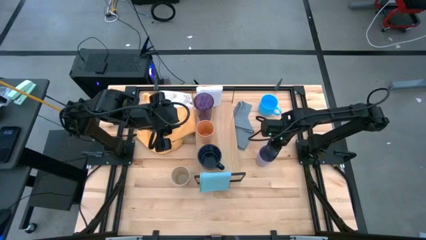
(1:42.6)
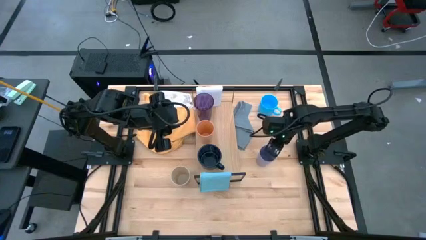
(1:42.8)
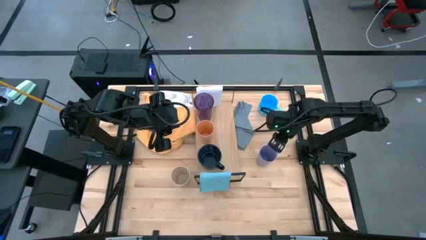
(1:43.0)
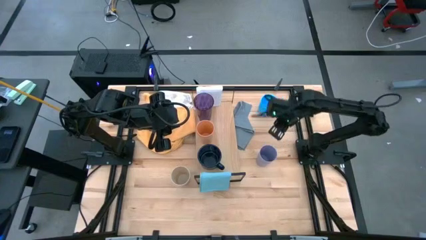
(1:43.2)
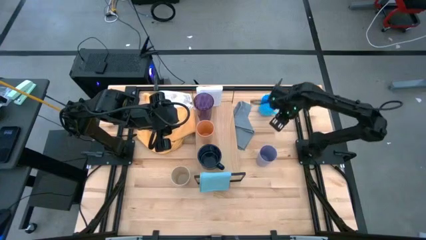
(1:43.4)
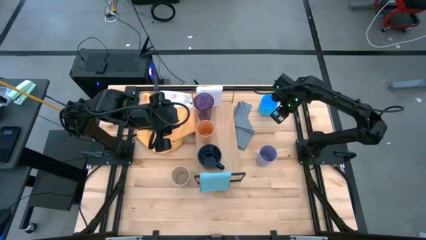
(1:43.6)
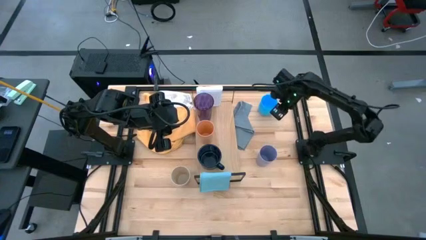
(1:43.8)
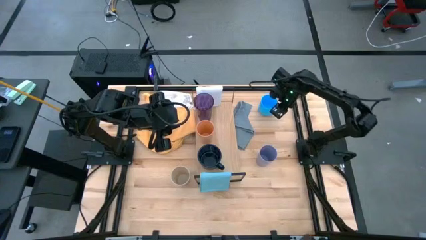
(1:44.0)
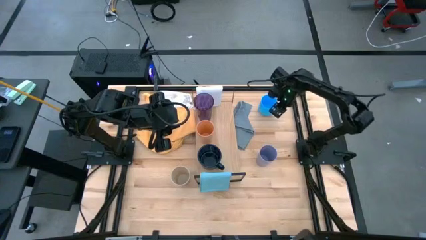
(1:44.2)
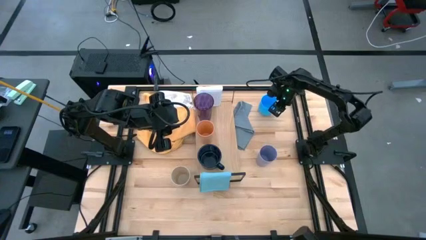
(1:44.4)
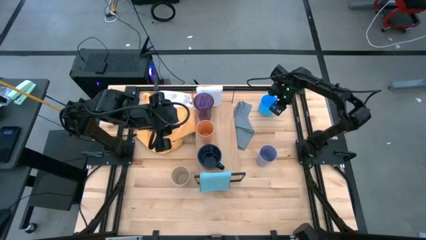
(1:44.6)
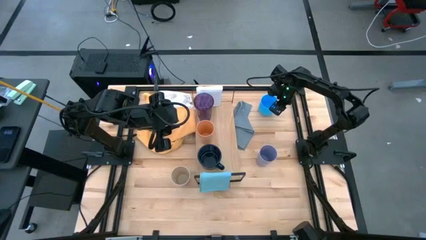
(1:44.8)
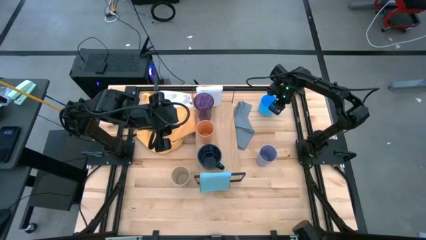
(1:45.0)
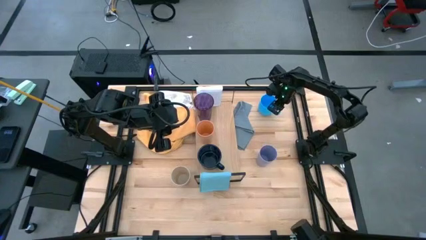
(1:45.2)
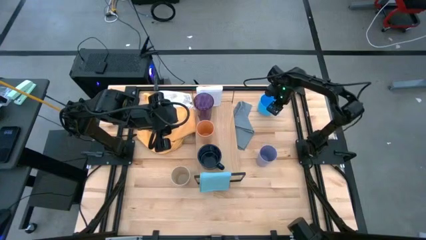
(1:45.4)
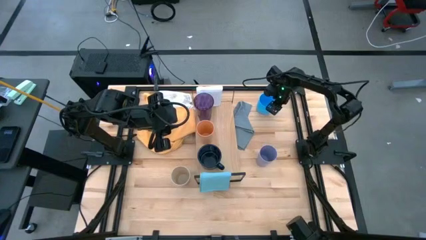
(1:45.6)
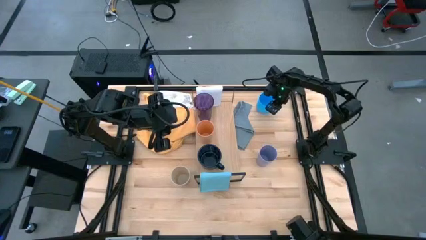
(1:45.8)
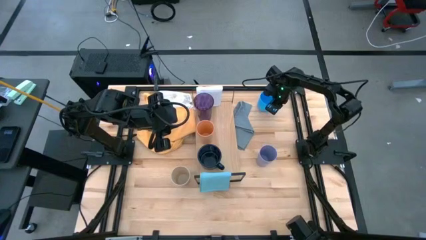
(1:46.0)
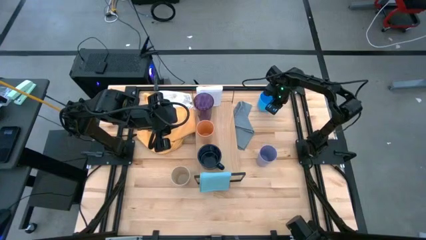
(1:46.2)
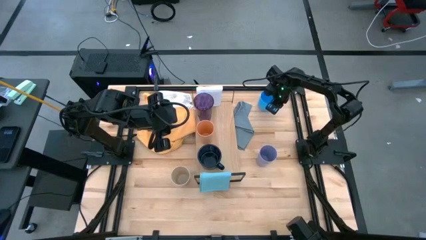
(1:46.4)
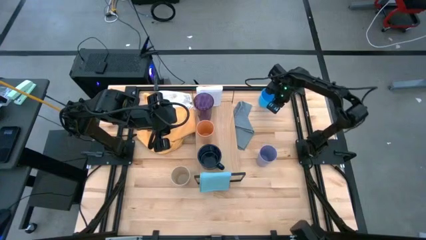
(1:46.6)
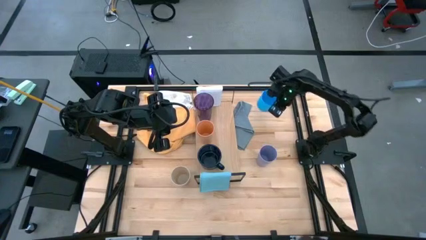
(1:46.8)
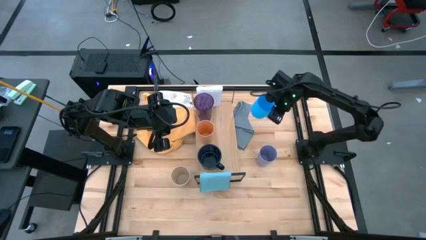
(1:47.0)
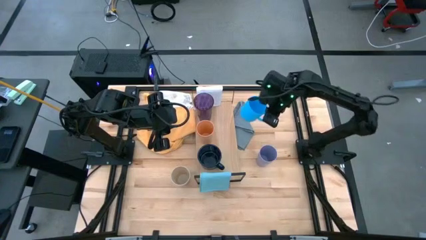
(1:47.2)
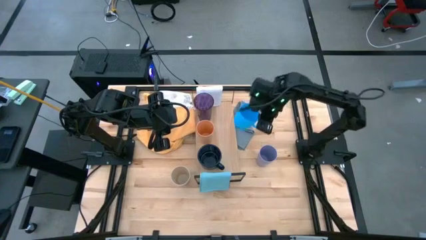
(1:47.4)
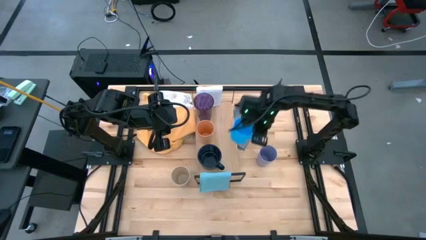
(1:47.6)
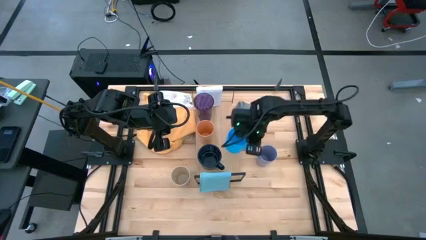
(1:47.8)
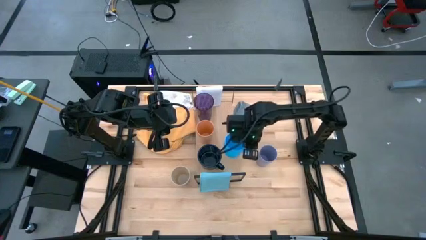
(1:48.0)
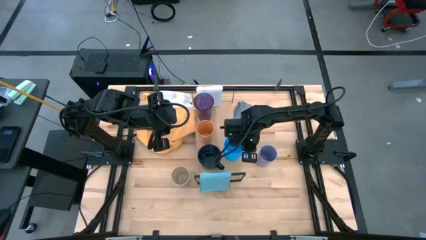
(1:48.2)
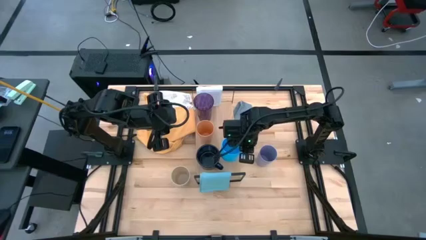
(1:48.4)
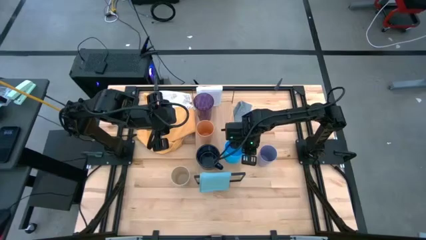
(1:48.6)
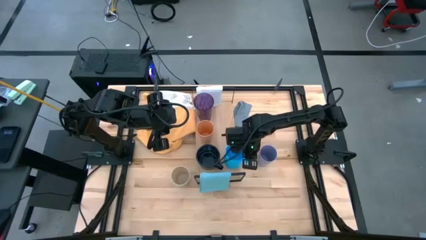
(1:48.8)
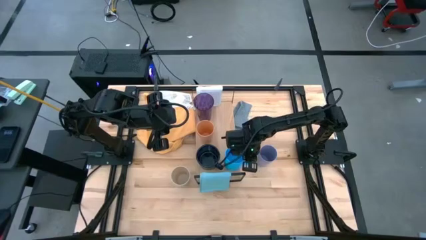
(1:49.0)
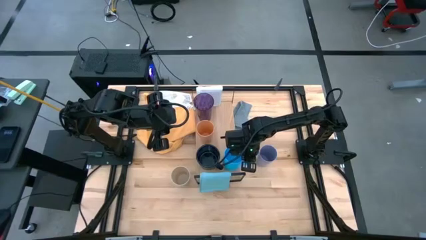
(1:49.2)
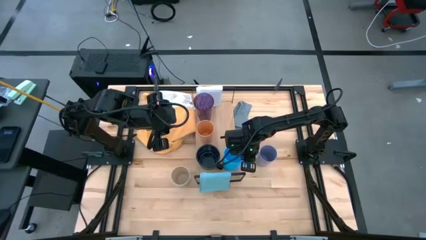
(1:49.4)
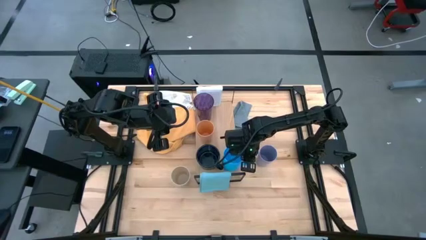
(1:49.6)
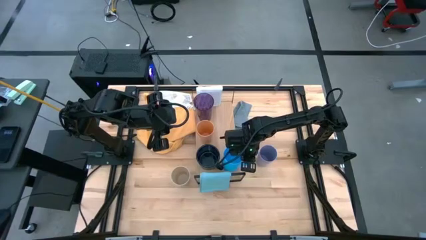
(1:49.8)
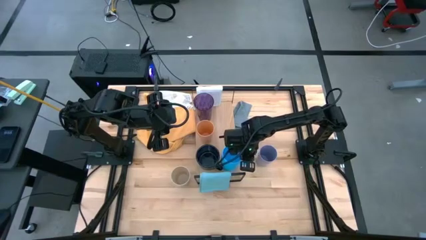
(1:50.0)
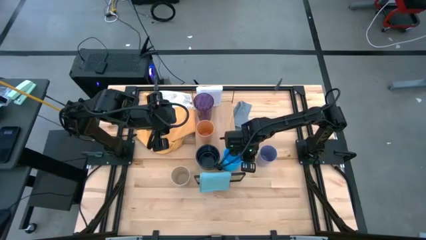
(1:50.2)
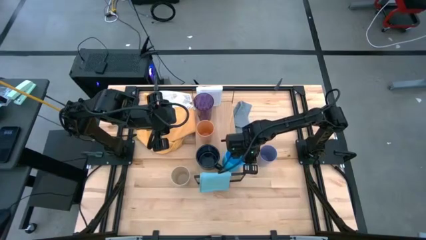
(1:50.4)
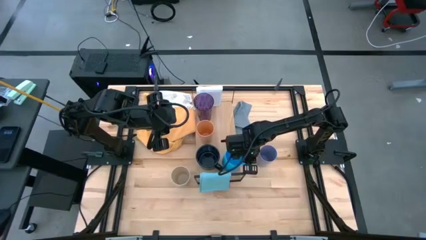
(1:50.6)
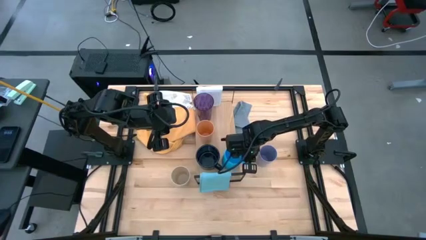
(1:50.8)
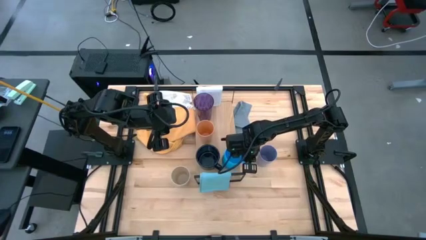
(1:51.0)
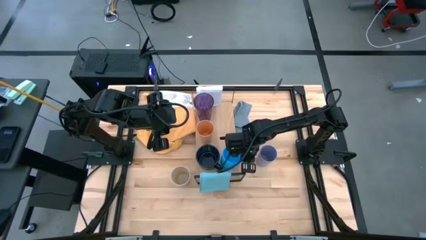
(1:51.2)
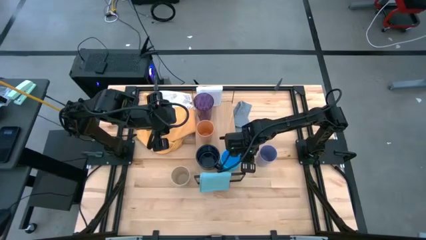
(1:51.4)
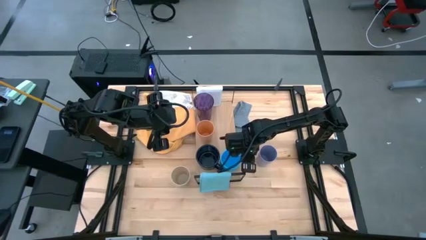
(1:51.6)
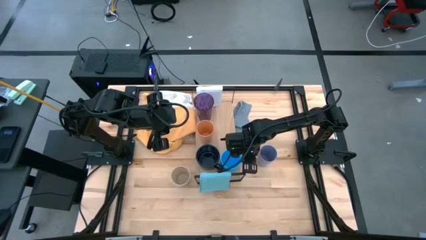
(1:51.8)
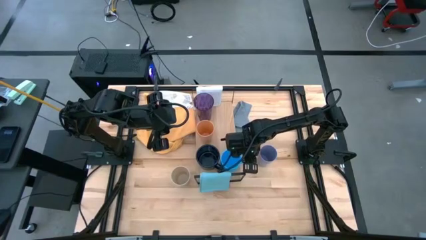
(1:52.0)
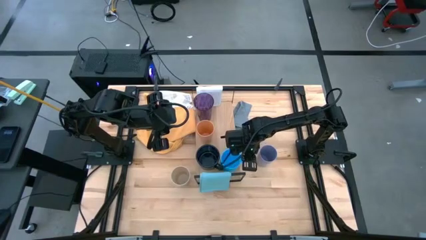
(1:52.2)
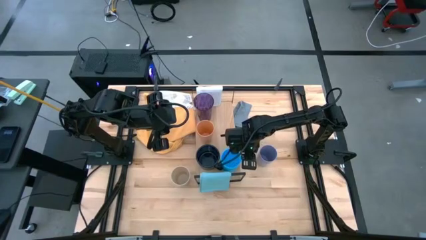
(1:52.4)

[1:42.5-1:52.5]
Task: Stack small to large cups/mugs on shelf
Put the blue mug on the shelf

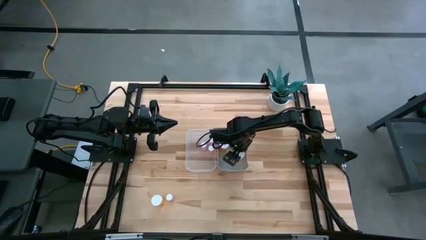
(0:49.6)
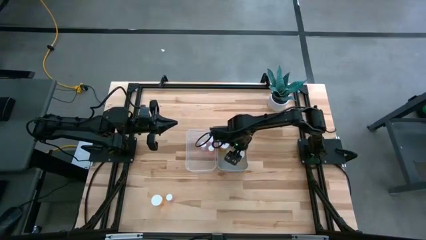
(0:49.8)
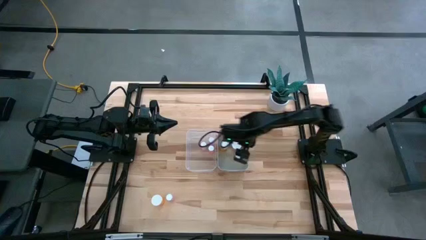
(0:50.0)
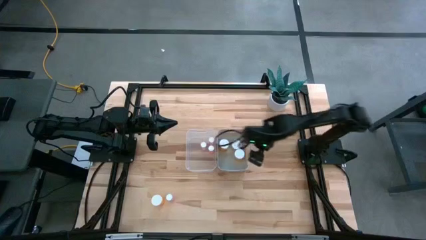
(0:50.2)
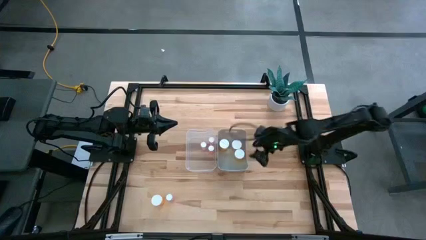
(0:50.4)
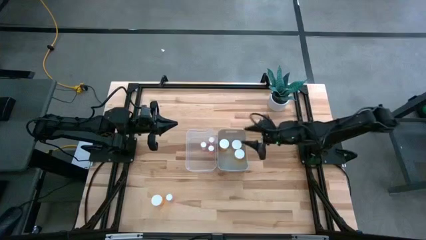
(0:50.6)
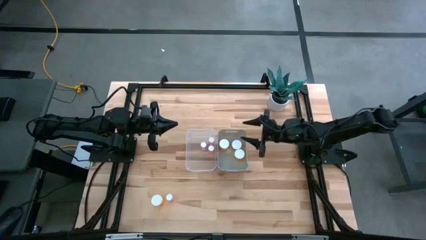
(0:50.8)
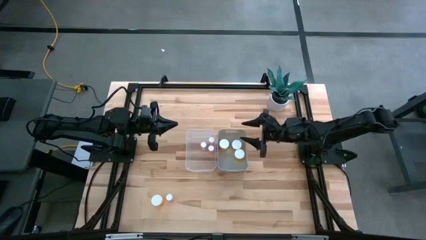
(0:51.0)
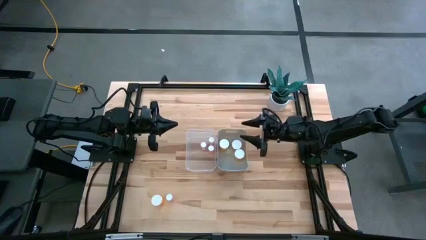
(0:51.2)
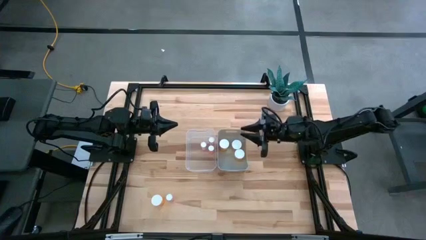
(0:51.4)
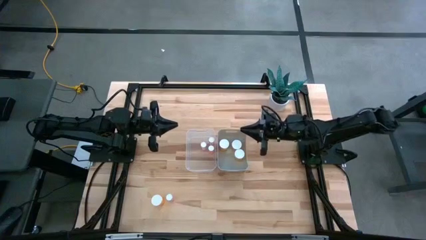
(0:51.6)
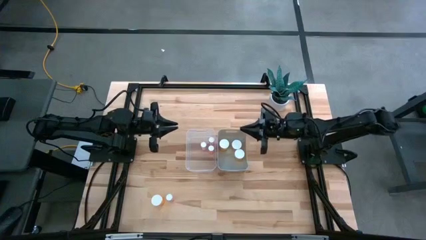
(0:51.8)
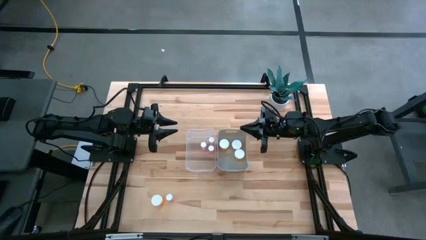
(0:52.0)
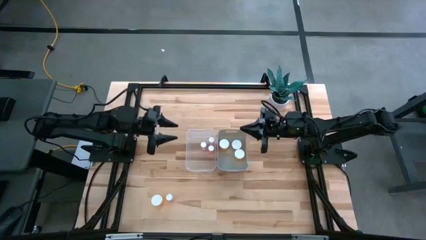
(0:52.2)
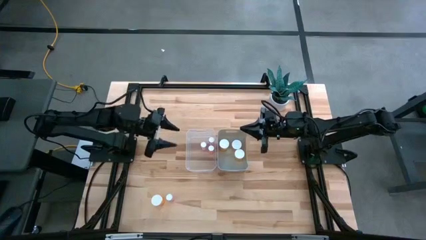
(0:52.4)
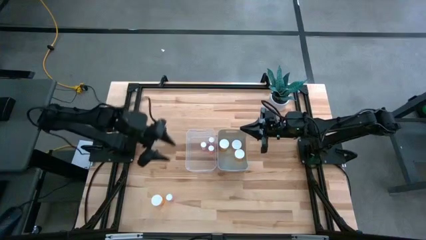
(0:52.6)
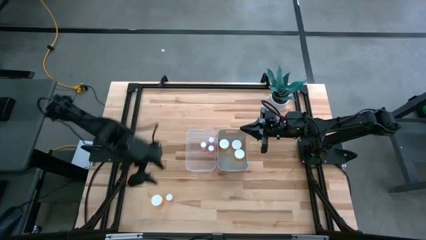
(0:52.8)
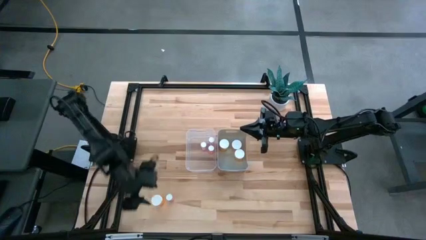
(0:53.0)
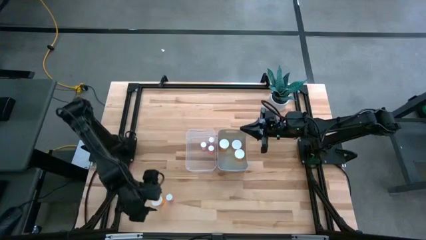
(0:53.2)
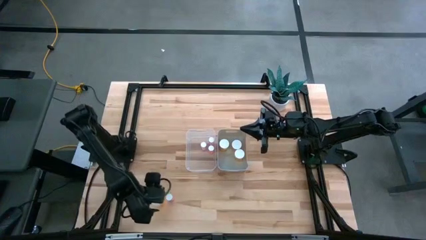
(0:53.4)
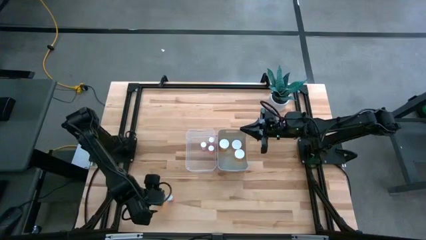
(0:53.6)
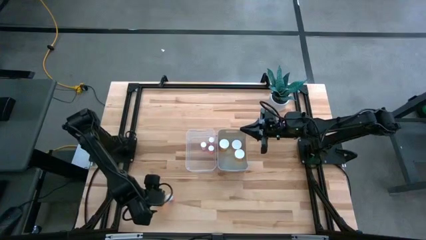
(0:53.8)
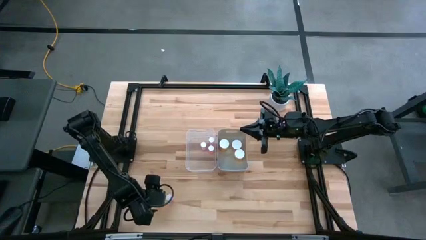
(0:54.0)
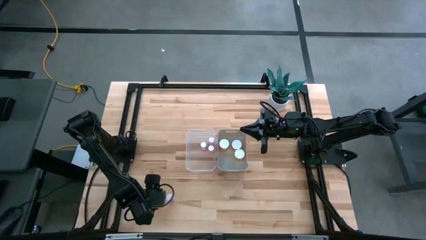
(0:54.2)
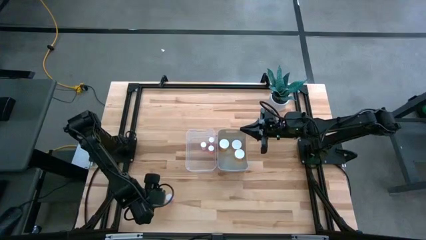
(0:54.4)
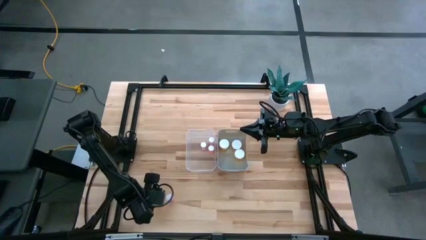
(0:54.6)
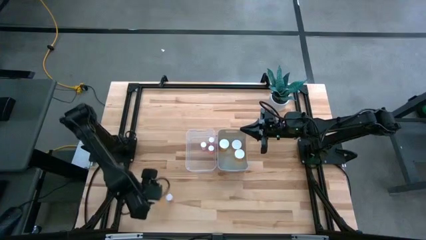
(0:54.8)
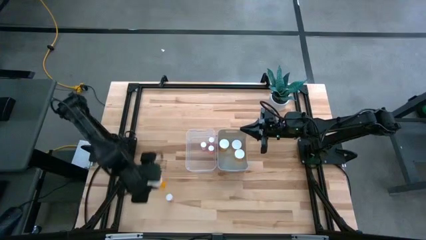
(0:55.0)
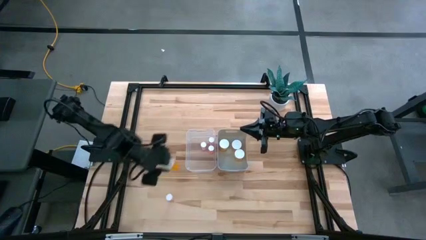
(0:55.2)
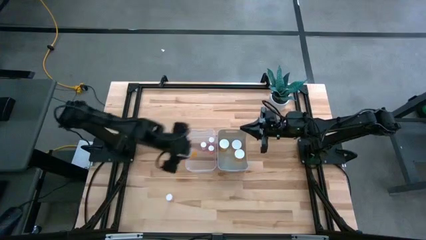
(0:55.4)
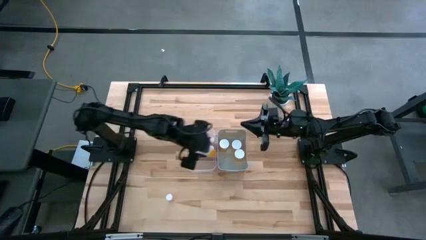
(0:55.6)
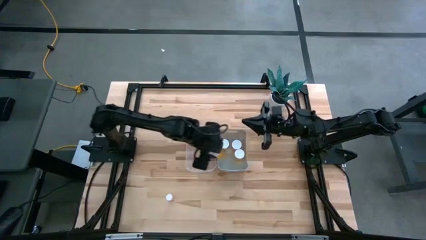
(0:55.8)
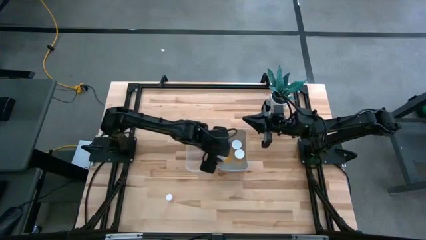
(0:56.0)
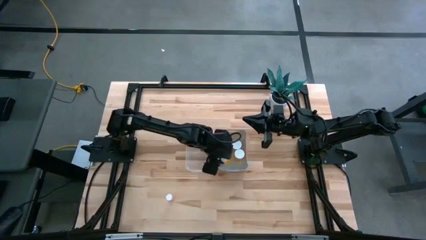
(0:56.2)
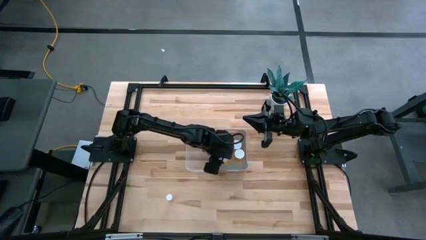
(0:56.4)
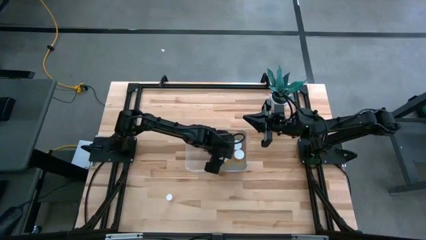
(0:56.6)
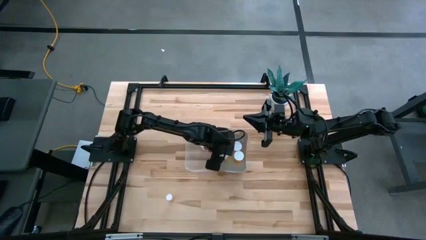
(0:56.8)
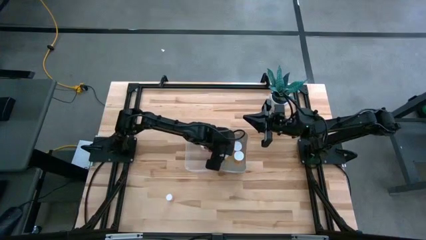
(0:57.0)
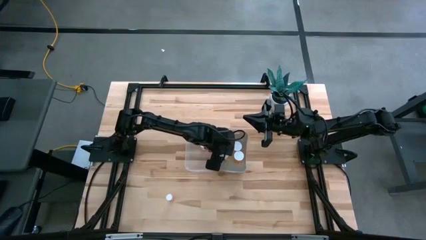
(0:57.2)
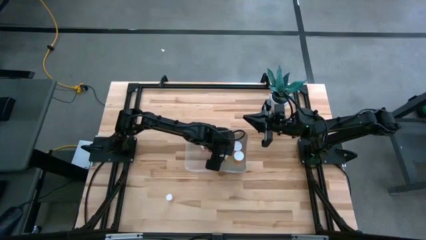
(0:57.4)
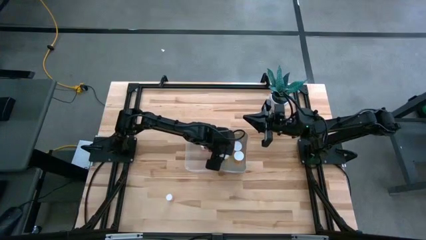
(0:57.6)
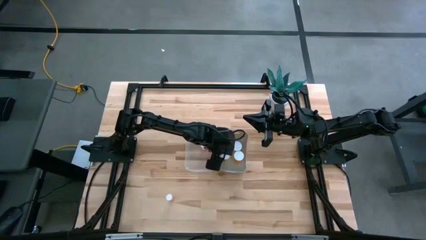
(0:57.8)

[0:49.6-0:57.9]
Task: Pick and place medicine bottles into bin by pill shape (circle, oval)
Put the large orange pill bottle into the gray bin
